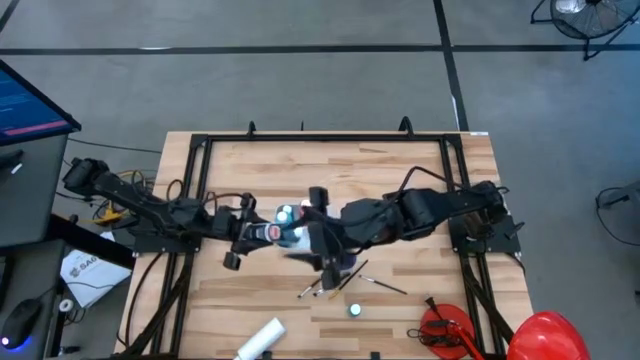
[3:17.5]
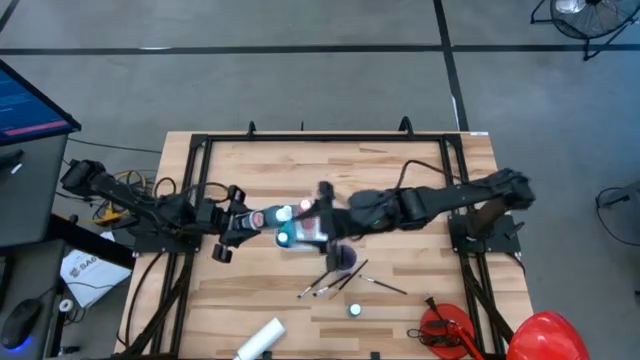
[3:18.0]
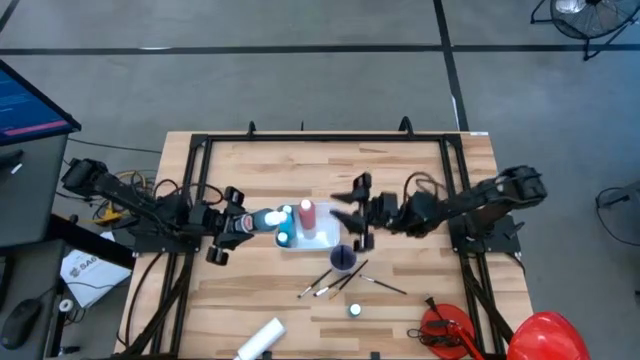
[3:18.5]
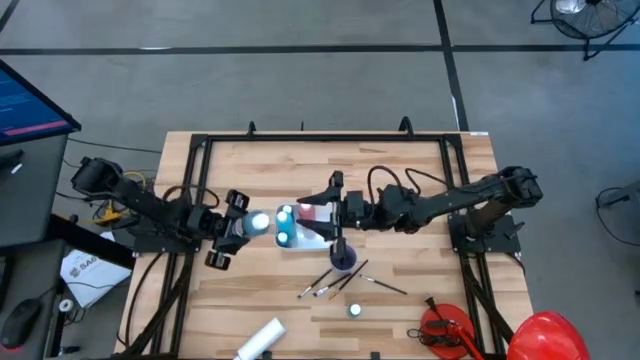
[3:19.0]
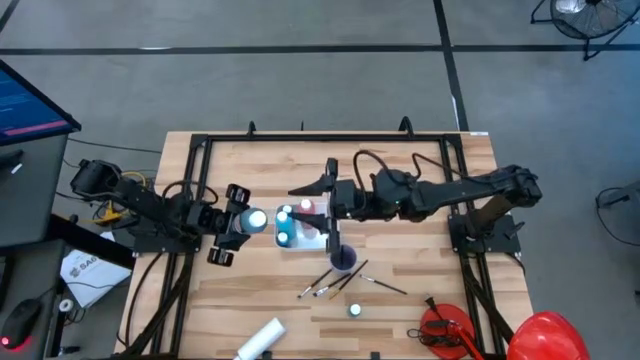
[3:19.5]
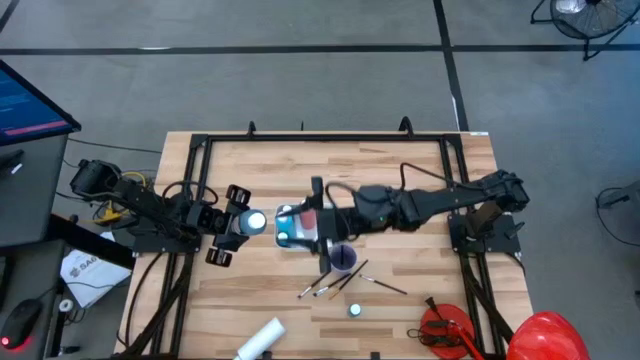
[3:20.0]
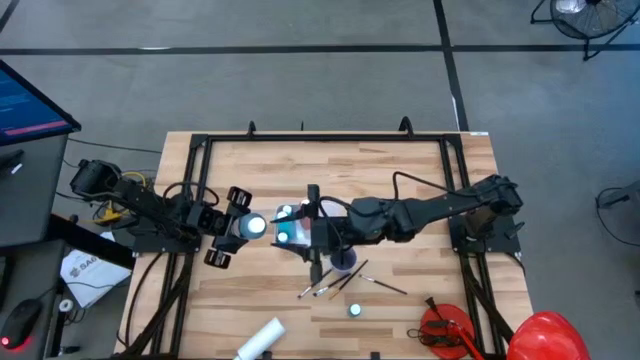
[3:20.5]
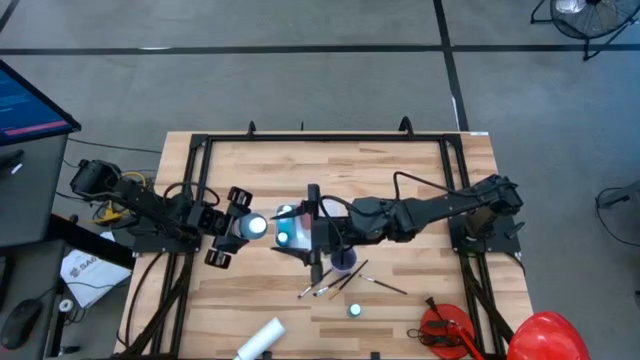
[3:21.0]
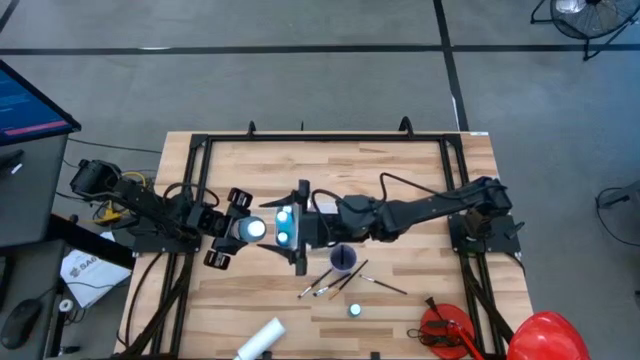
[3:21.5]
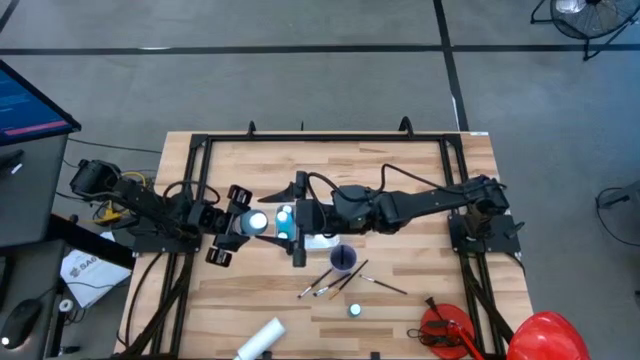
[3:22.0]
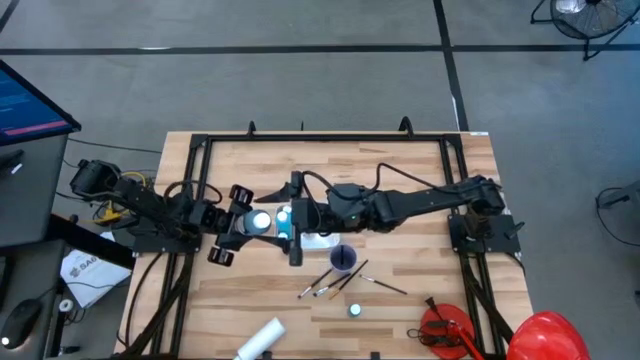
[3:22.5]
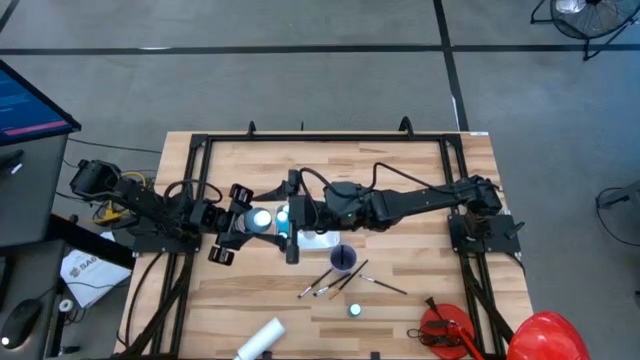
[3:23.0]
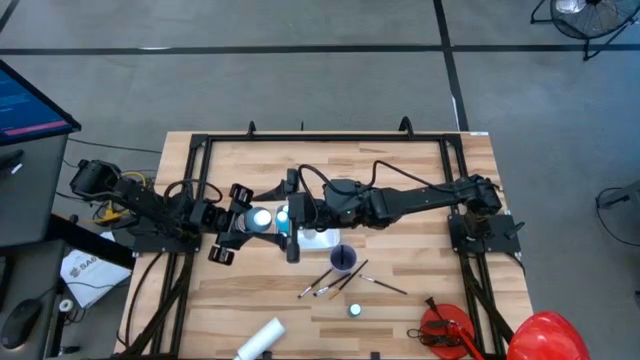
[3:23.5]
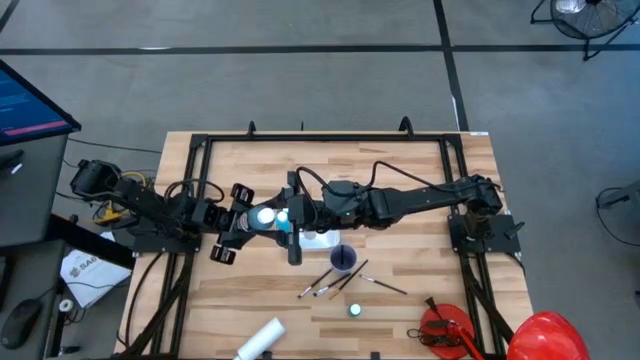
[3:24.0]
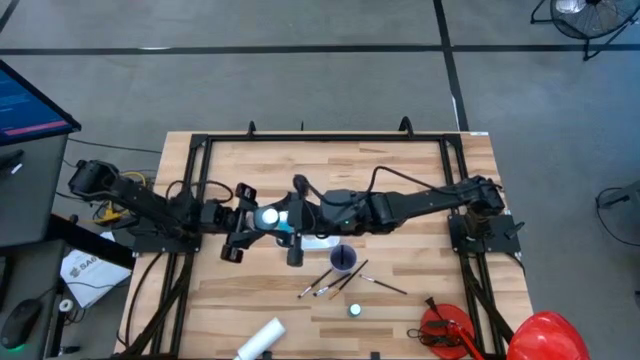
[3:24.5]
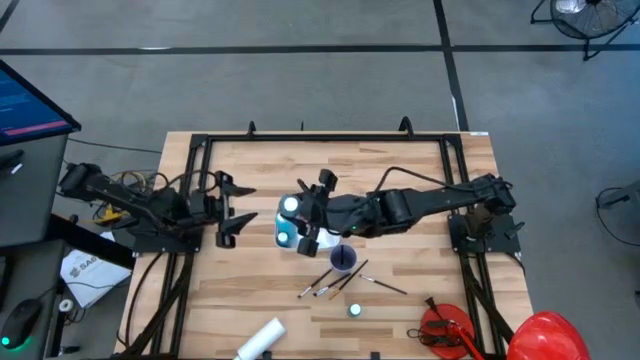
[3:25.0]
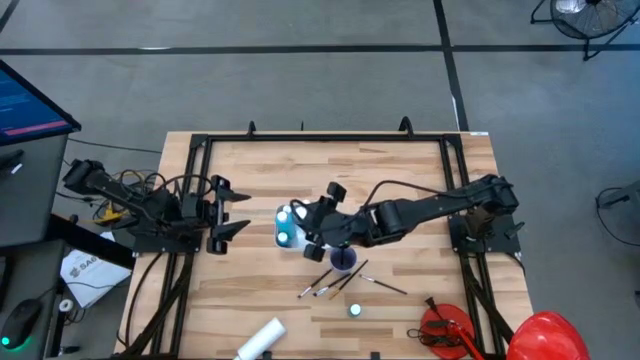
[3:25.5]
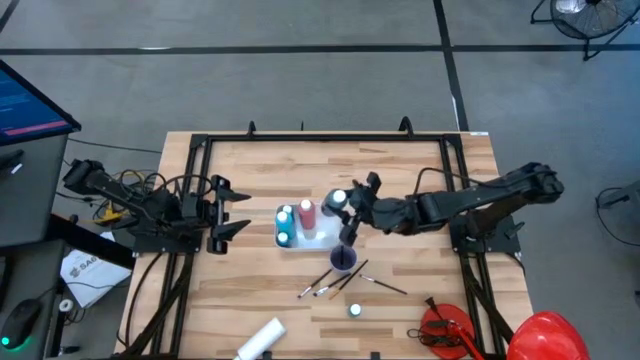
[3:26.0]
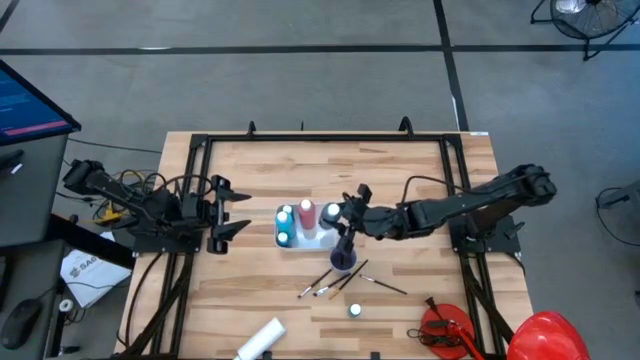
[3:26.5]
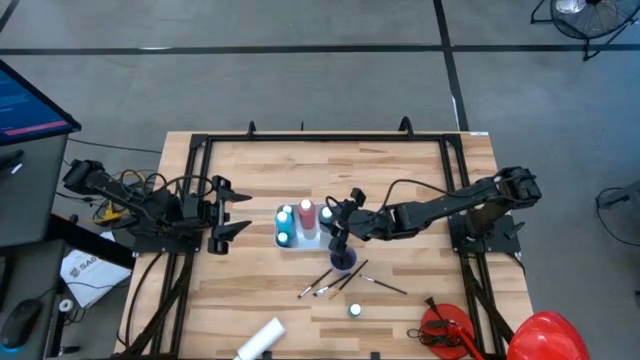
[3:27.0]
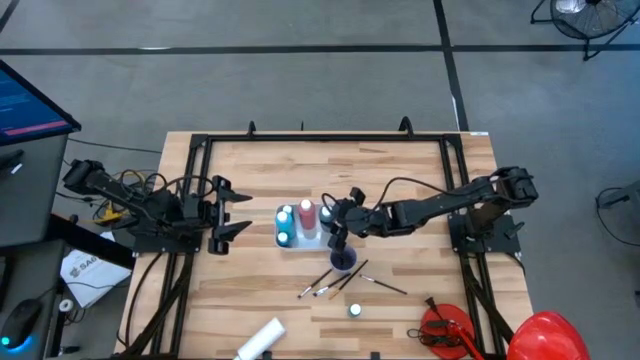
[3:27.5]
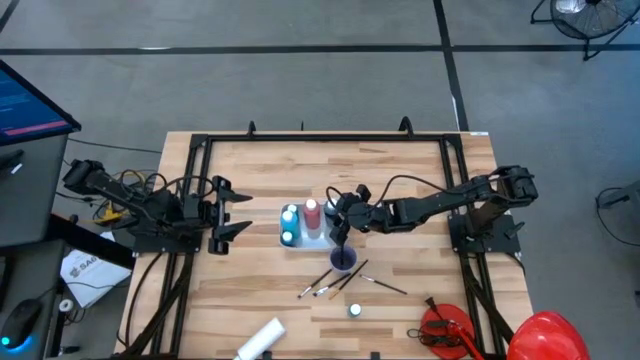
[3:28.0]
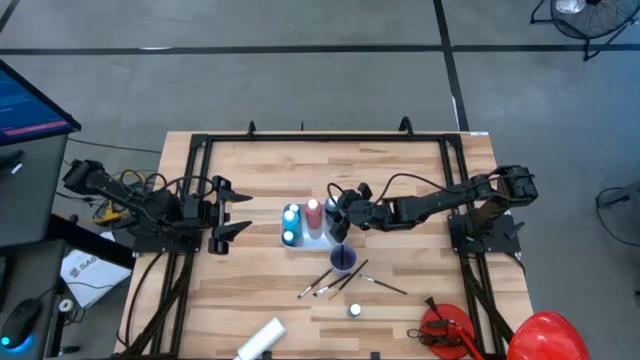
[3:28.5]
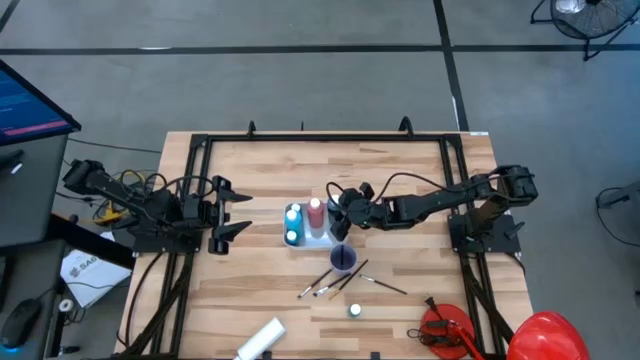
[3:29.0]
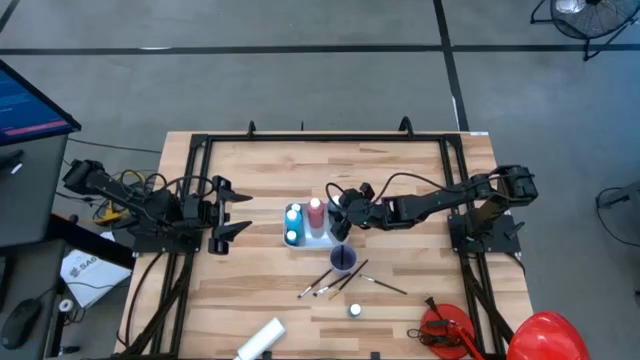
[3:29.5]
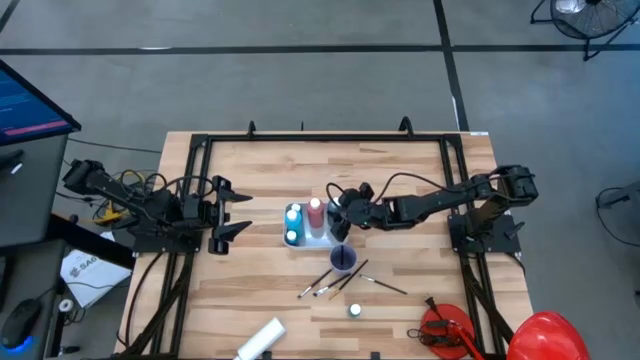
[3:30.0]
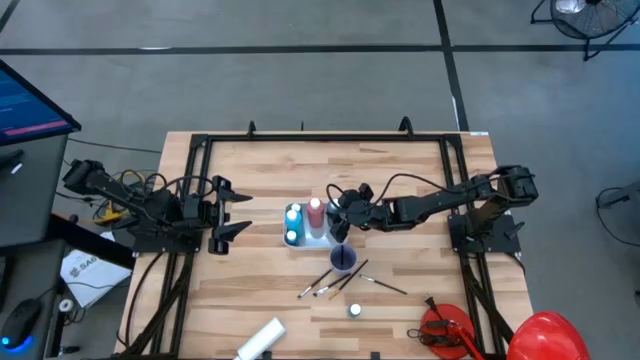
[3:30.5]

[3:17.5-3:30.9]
Task: Pick & Place Paint Supplies
Put the black paint bottle into the white bin

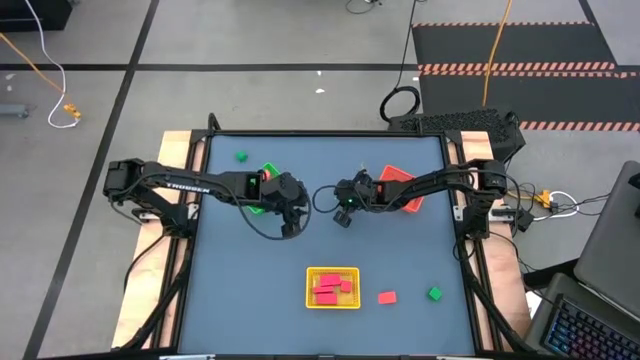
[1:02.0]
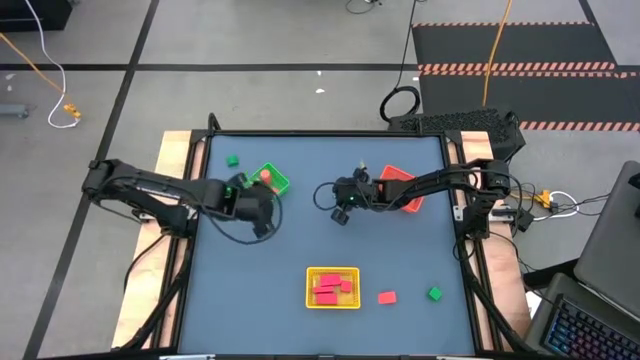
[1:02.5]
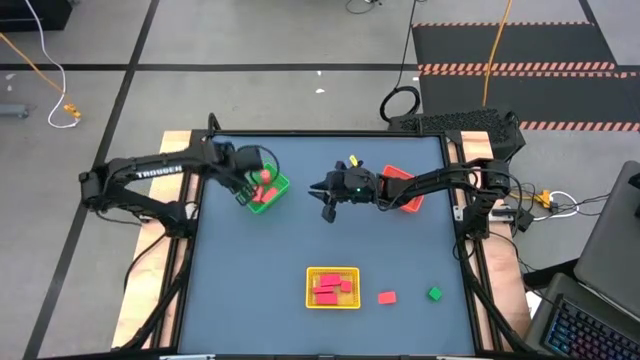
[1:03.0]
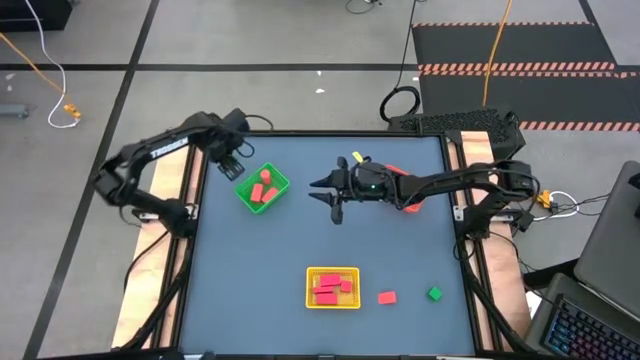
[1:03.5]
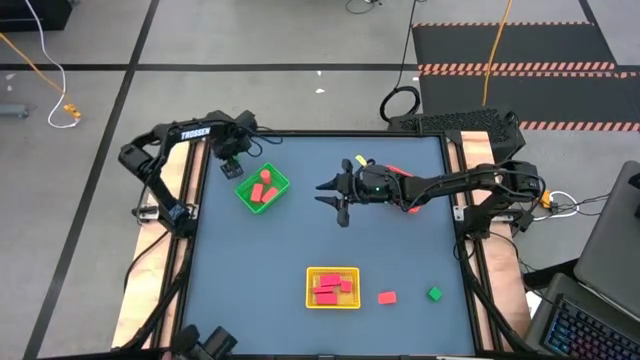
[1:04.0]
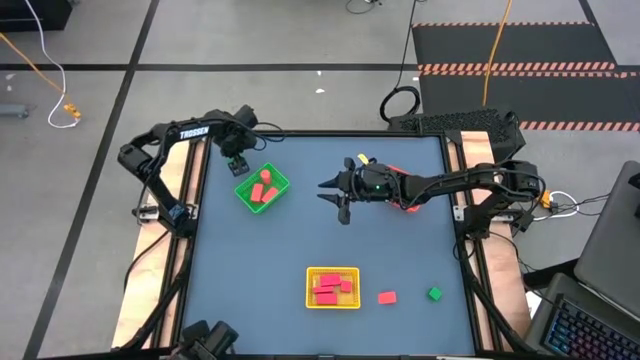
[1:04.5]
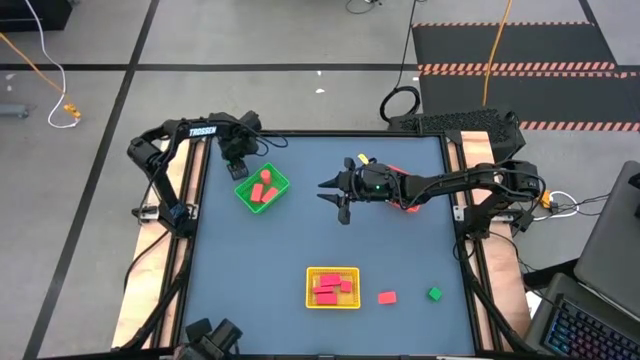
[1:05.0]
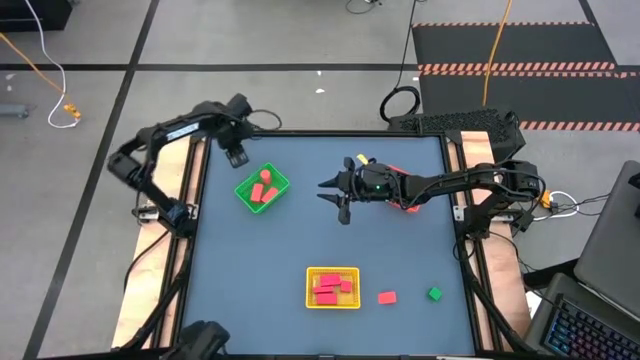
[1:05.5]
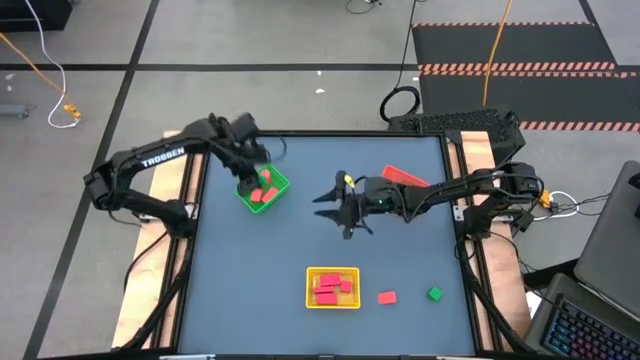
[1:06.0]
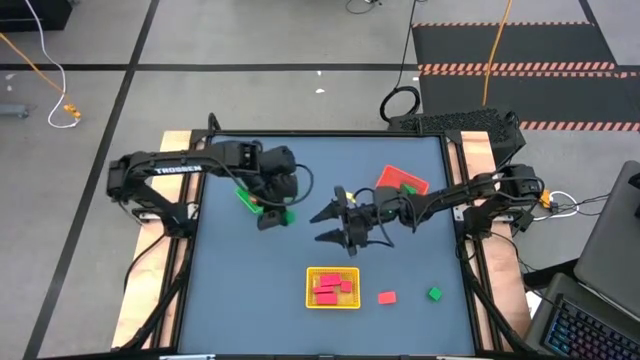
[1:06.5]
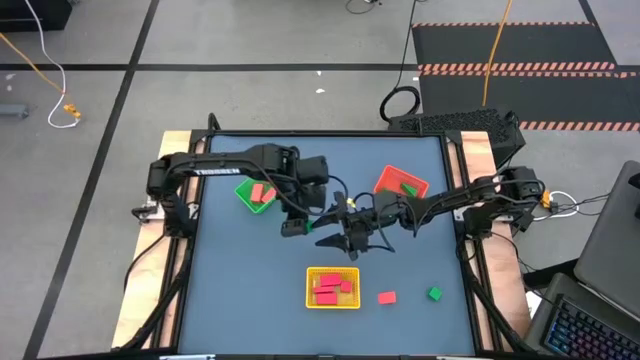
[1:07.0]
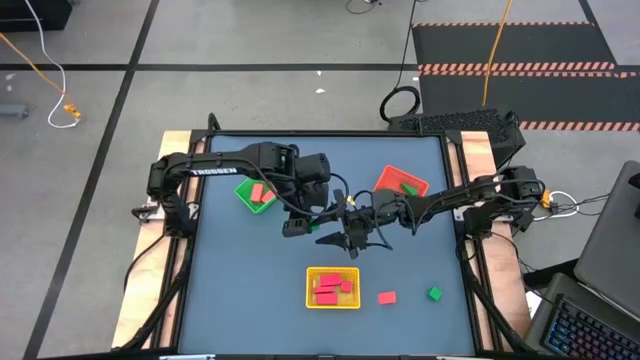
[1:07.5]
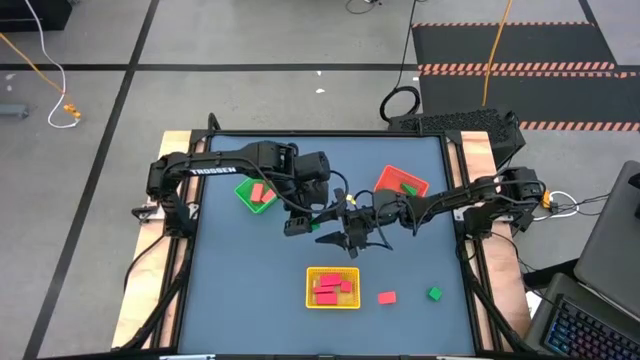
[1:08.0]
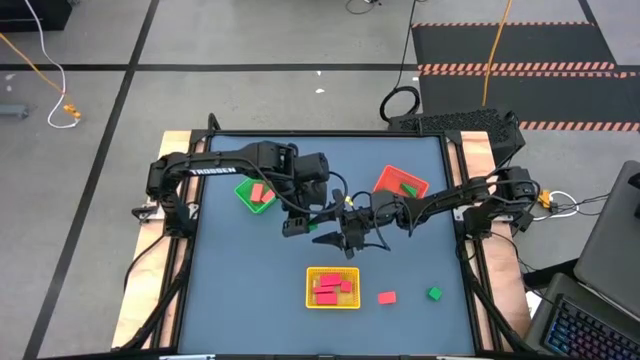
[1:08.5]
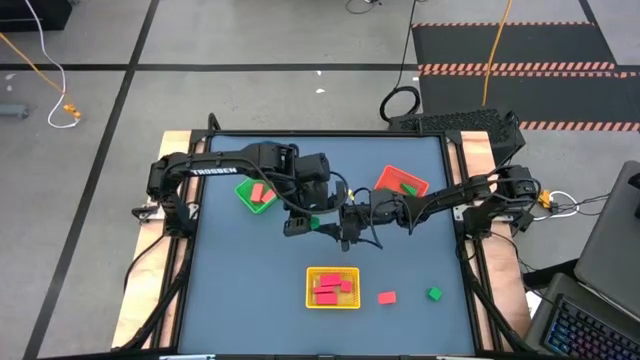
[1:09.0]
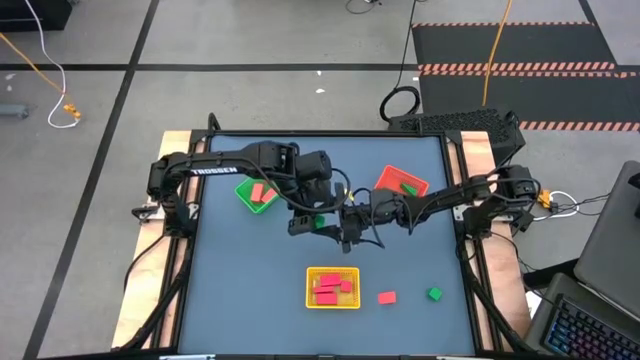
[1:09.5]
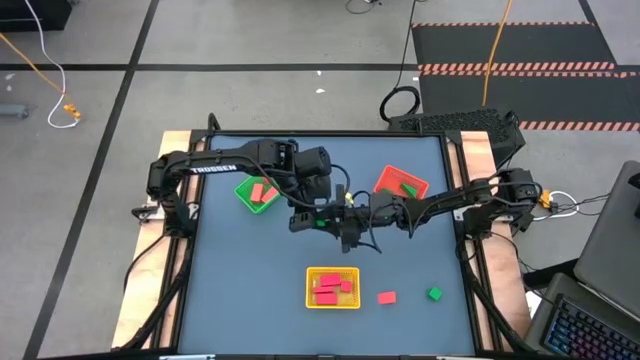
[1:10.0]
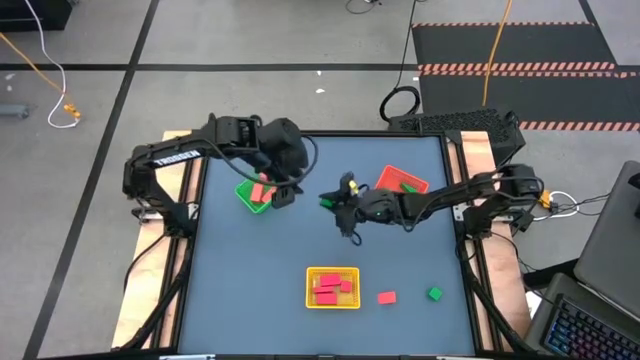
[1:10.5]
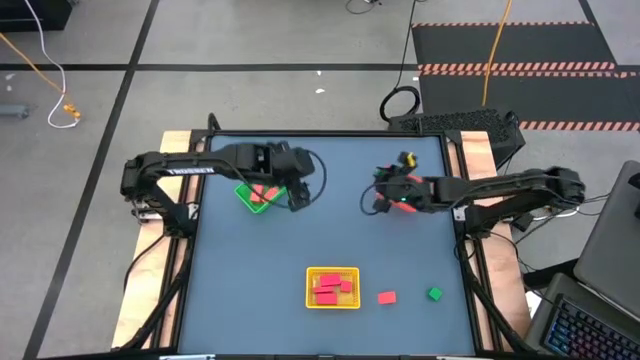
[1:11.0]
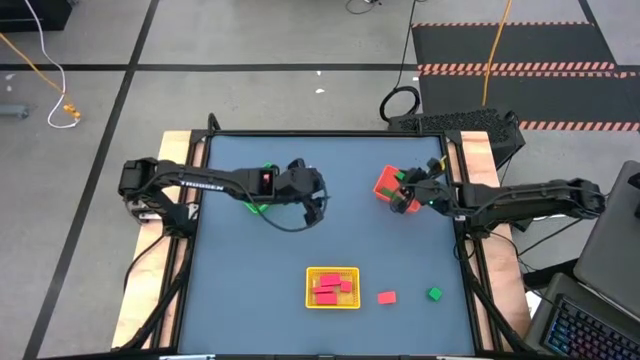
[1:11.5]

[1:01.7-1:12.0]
Task: Sort & place blocks by color
Put the green block into the orange bin
